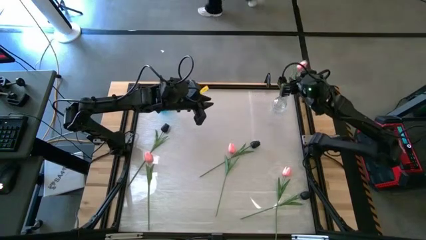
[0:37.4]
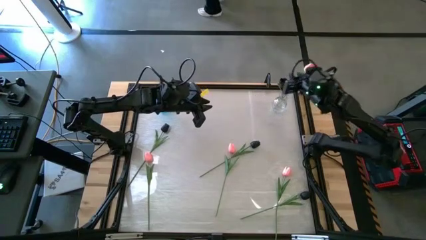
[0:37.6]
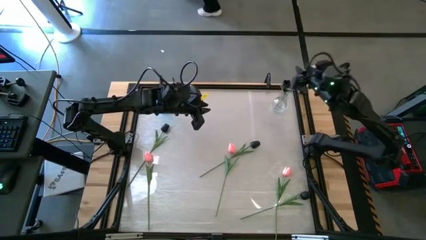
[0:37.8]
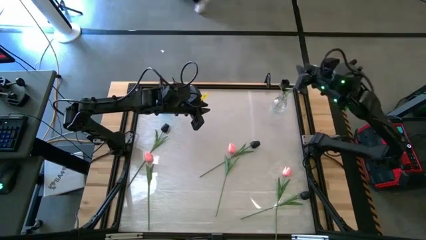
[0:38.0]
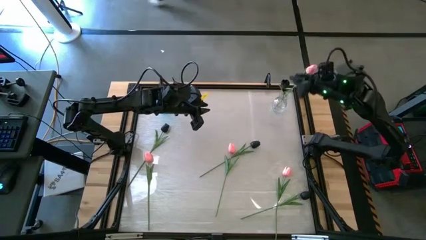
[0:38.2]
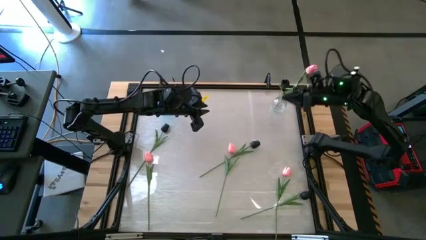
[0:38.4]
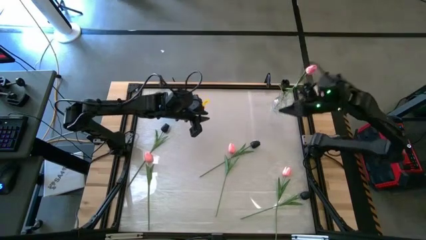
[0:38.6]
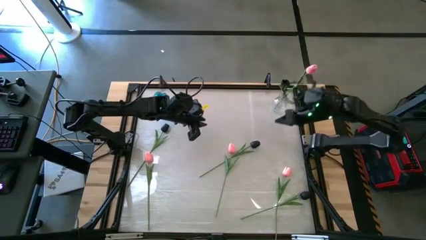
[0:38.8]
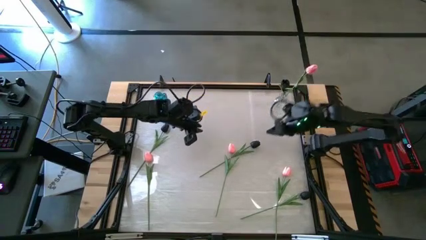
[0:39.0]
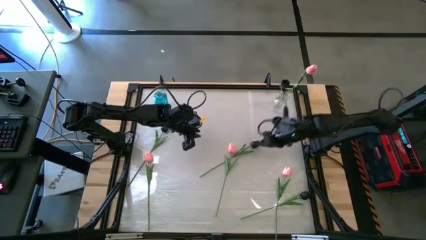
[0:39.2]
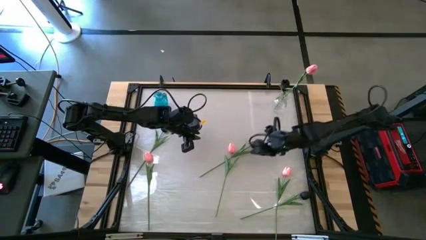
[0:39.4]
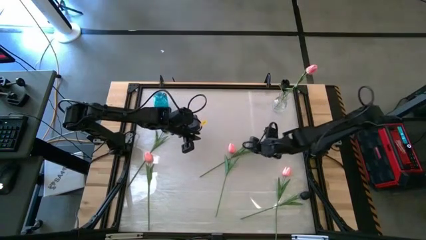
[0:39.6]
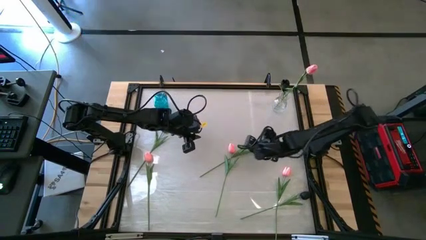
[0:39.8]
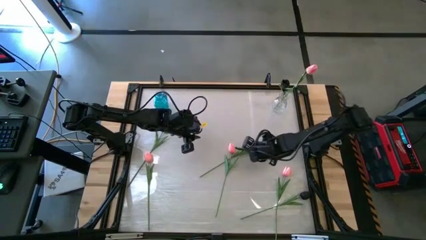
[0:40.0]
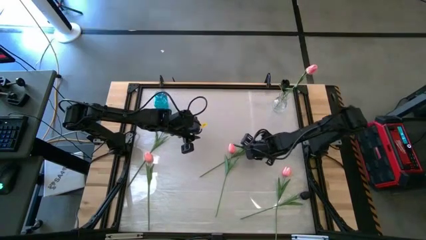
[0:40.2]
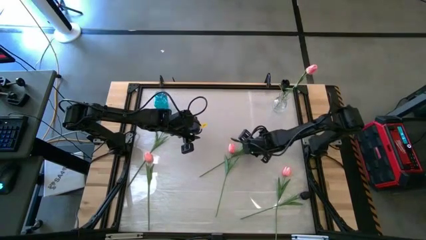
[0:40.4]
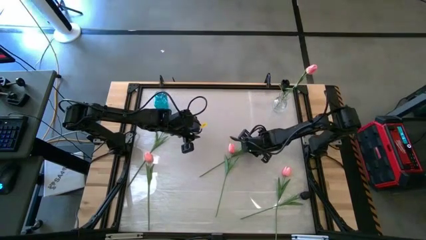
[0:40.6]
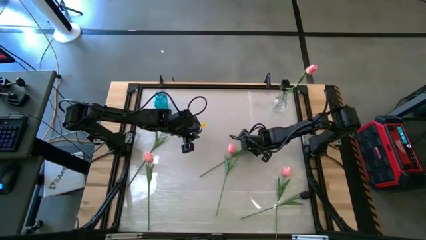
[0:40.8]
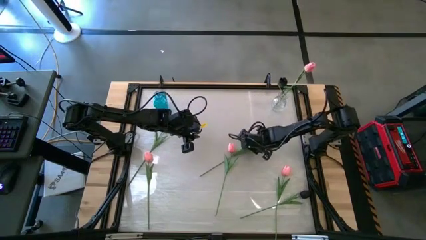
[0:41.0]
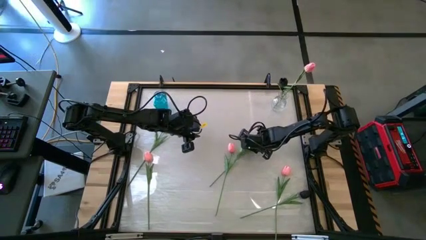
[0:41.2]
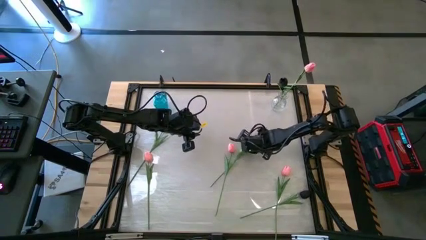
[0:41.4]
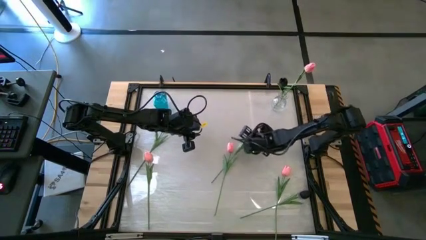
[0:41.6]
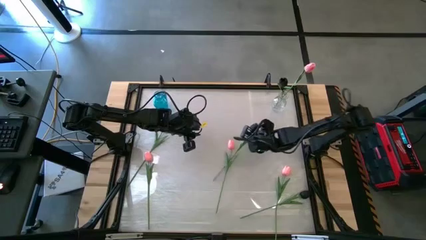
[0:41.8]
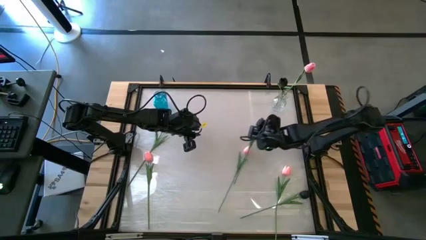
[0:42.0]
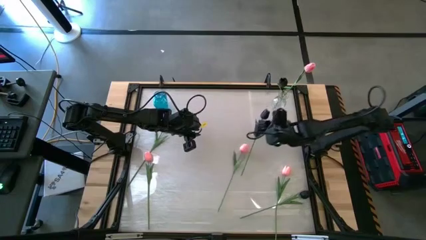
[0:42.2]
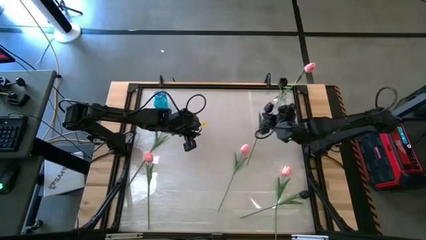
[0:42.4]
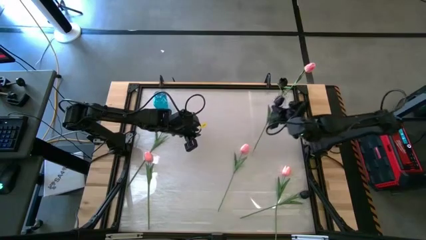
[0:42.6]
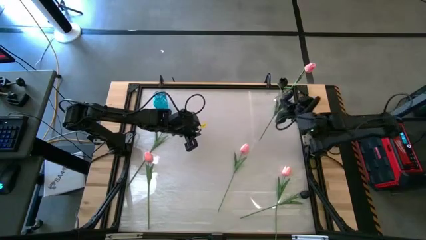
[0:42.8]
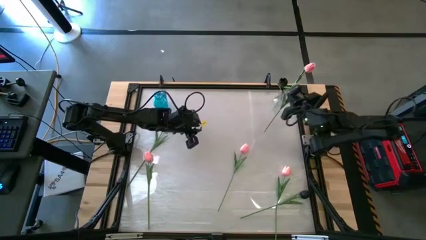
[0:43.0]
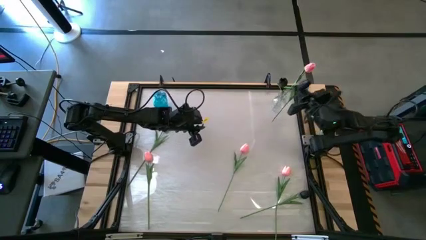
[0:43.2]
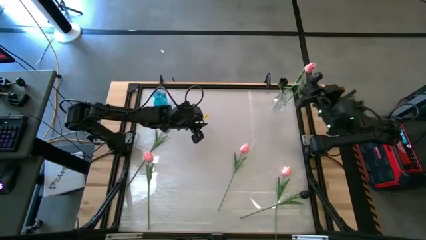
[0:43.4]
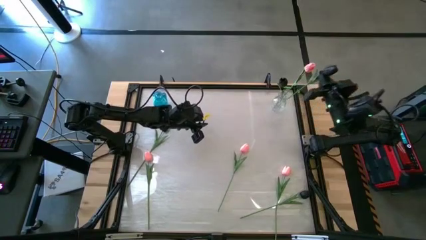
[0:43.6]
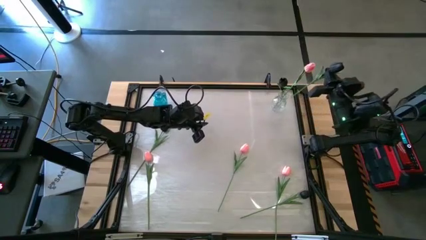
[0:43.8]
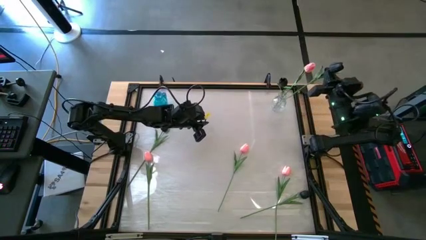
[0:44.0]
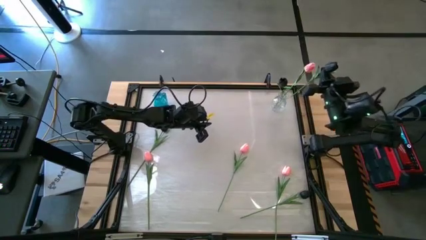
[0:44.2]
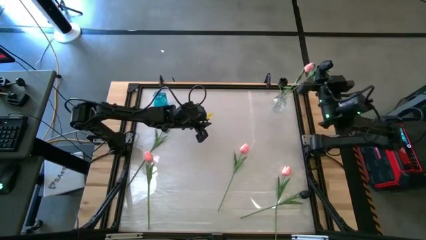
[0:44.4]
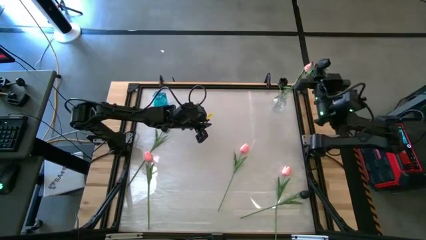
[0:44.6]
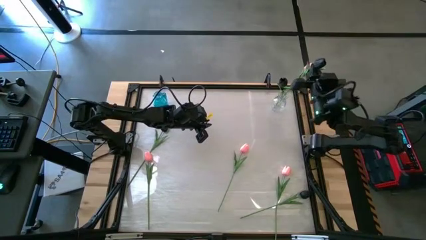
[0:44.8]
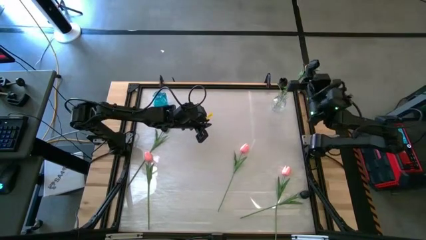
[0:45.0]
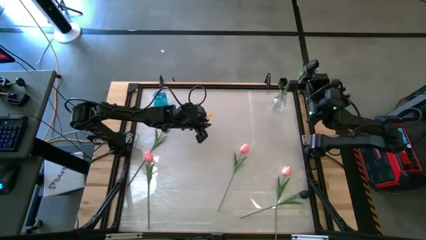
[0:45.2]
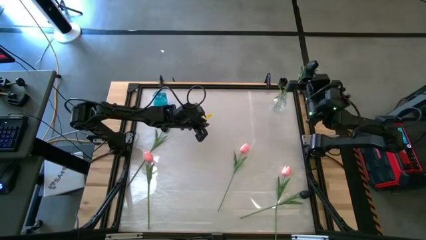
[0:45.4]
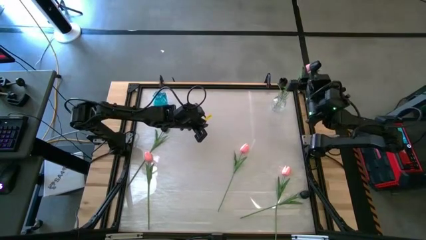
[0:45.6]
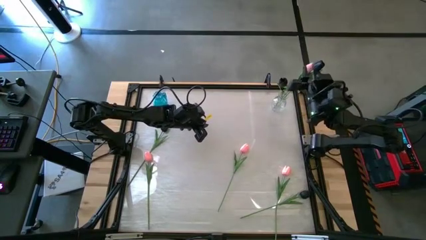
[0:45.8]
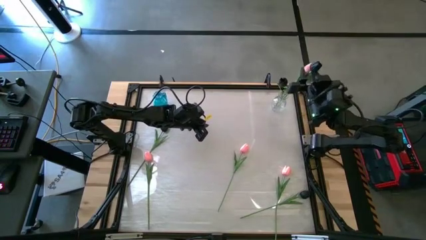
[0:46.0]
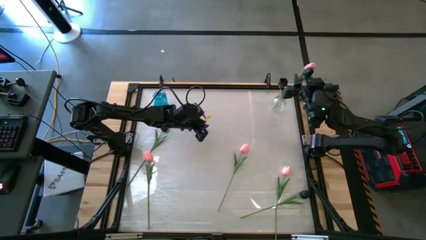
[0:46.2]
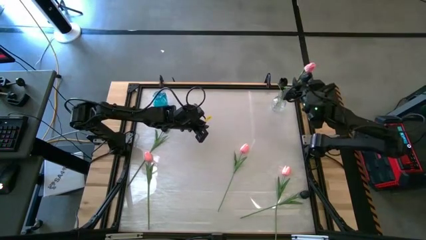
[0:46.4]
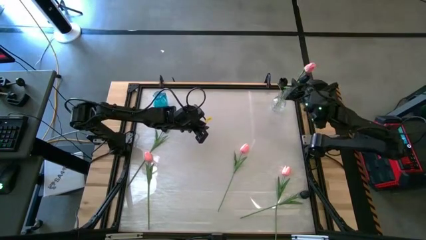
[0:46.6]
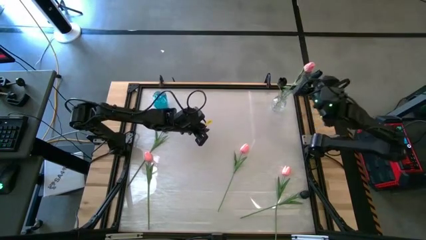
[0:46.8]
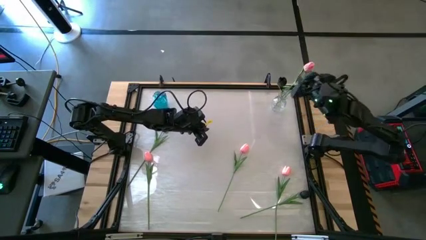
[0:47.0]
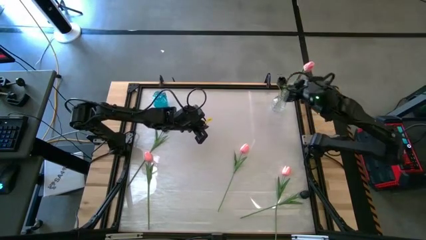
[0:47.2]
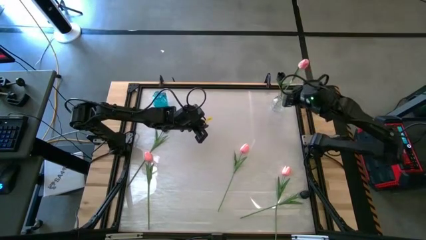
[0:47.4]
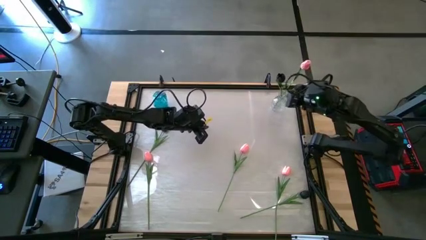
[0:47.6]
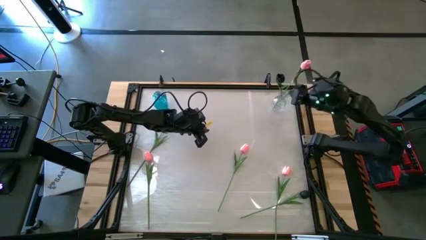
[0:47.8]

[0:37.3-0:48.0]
Task: Sort flowers into vase by color
Put the black flower into the transparent vase

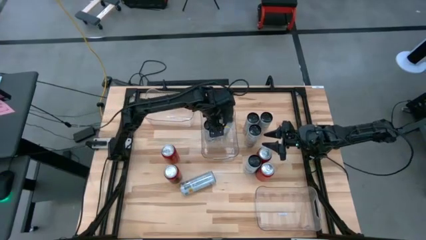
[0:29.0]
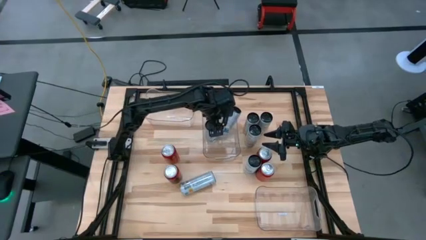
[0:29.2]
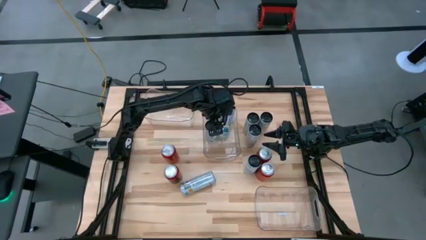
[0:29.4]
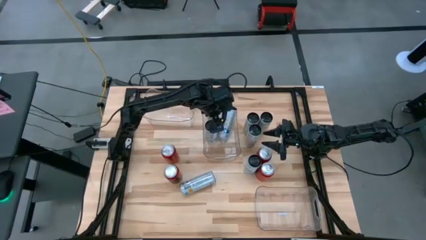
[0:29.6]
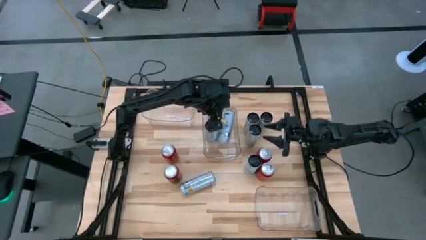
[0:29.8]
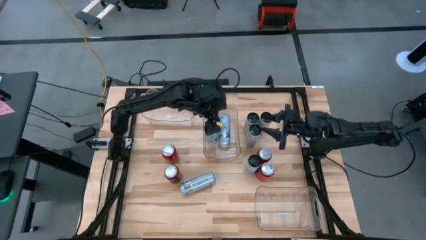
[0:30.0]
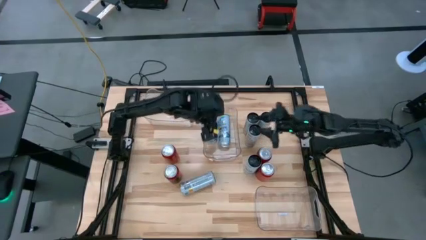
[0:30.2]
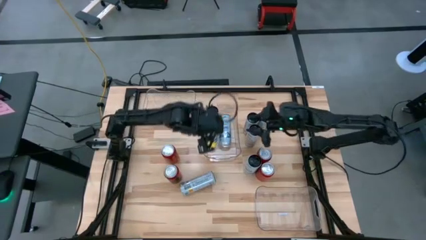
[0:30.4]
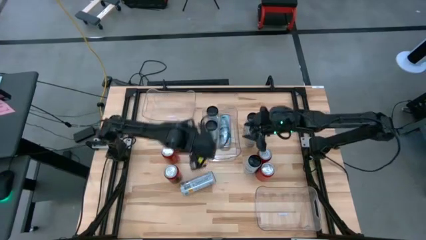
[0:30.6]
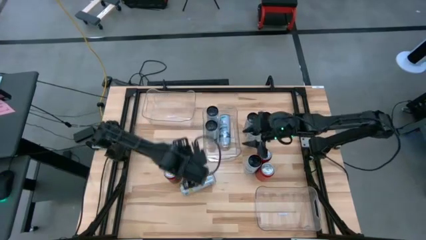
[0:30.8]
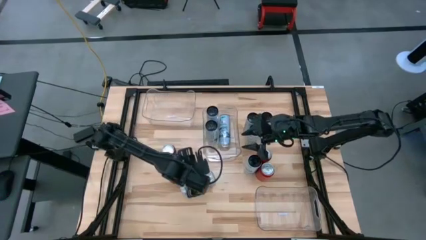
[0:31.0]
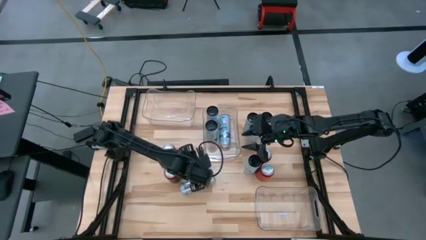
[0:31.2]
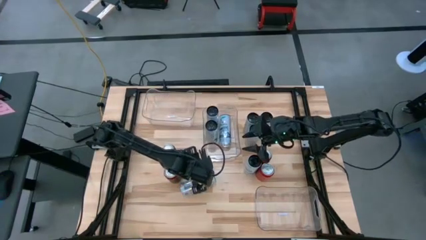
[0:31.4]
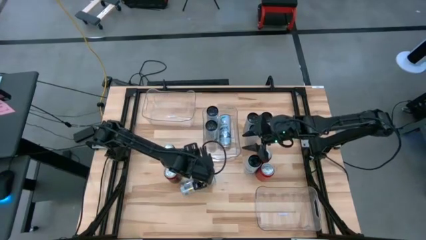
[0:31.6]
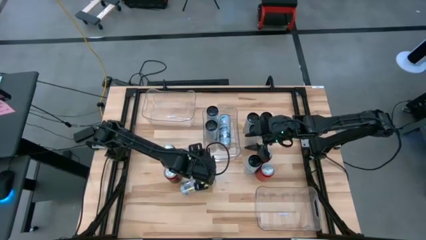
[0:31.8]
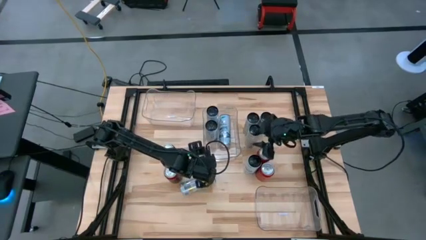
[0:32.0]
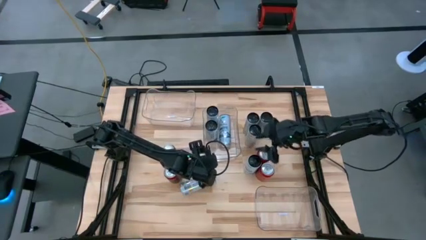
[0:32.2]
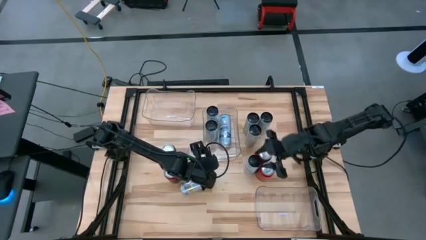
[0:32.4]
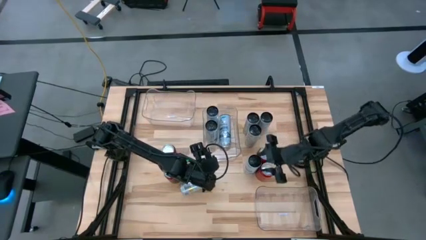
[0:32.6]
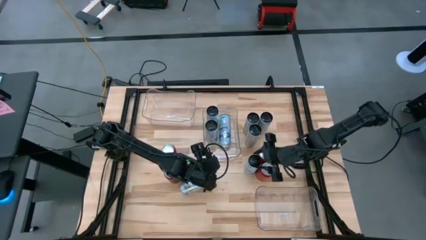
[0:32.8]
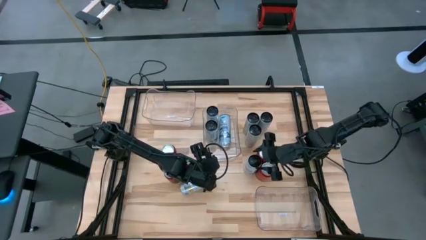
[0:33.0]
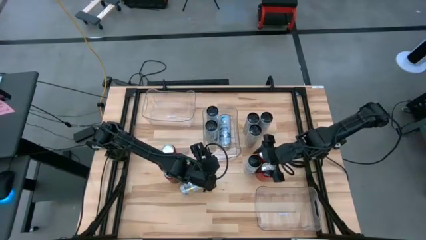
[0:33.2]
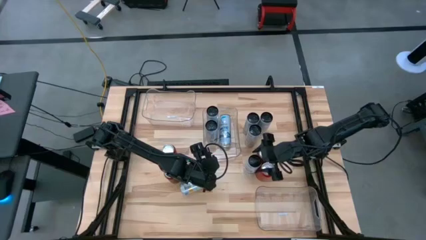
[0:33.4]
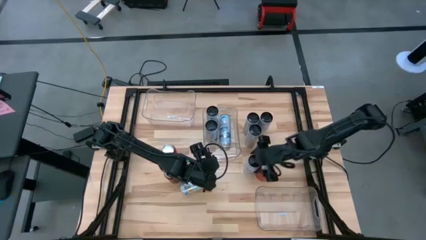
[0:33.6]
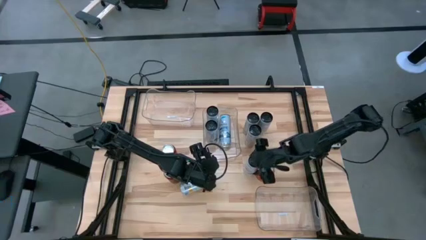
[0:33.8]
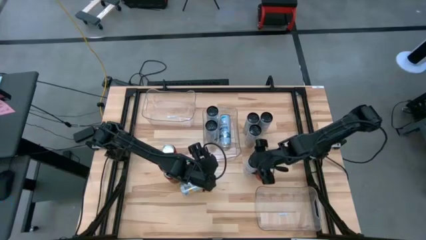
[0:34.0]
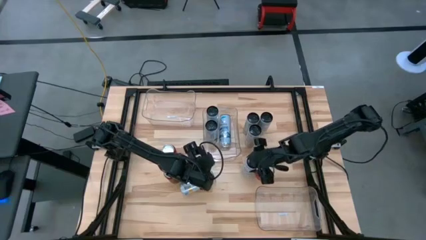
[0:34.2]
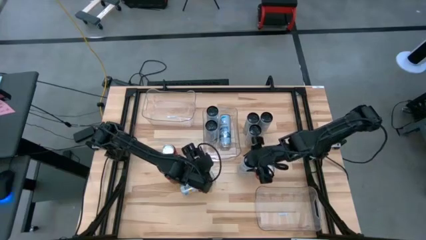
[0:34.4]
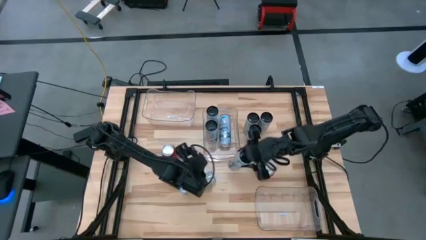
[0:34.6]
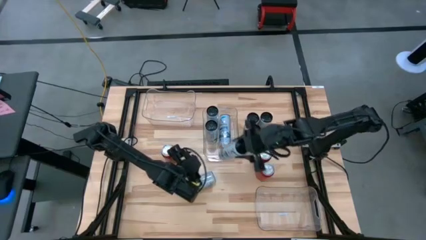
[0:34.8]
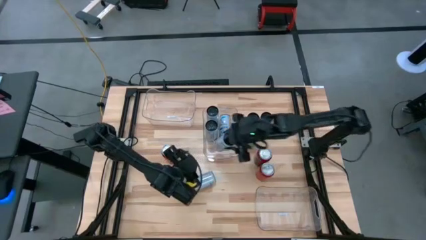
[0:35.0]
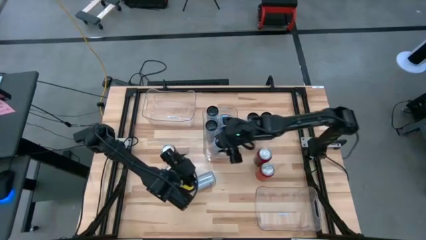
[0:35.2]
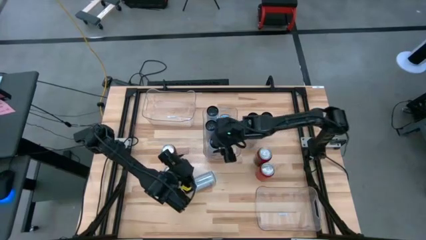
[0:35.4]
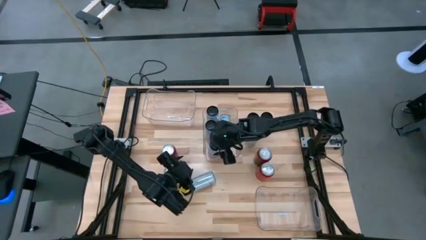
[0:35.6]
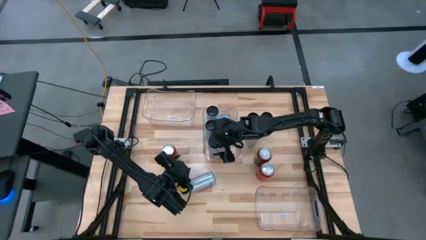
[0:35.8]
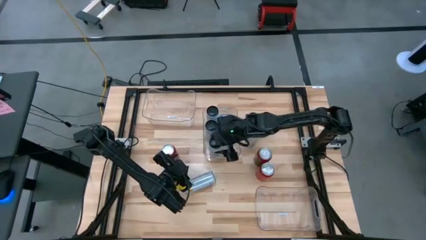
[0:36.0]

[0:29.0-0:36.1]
Task: Sort soda cans
Put the white blue soda can into the middle transparent bin
